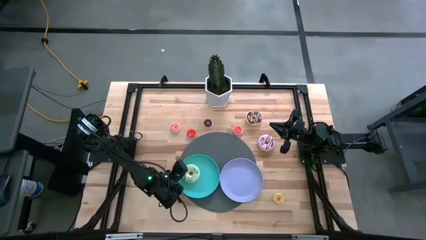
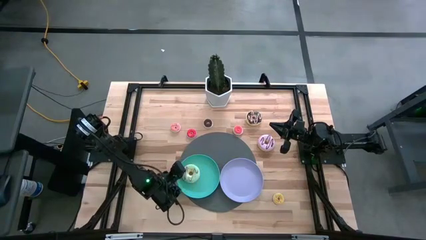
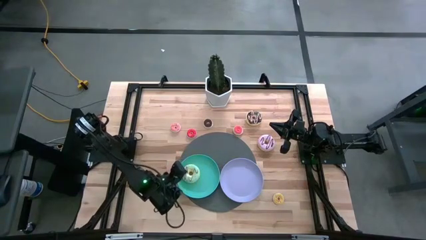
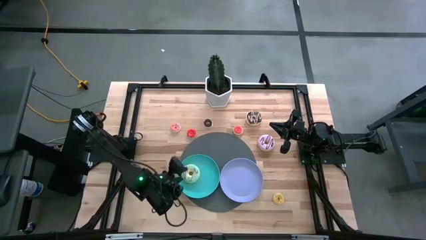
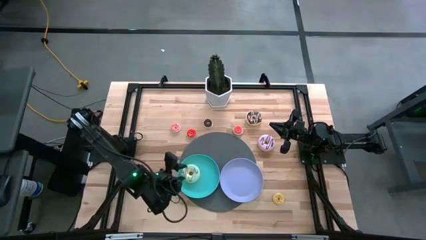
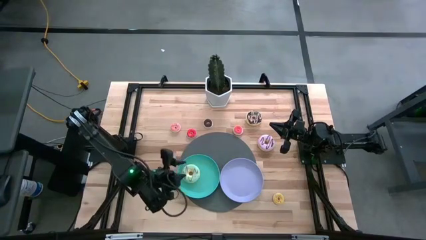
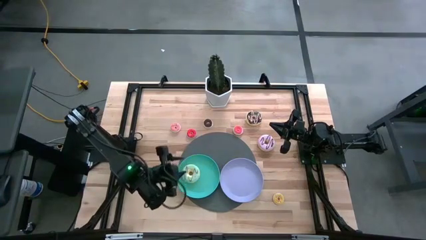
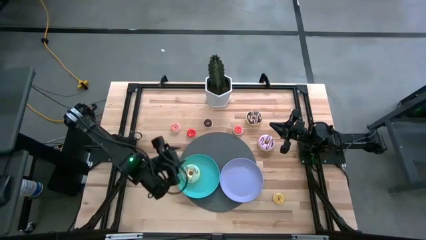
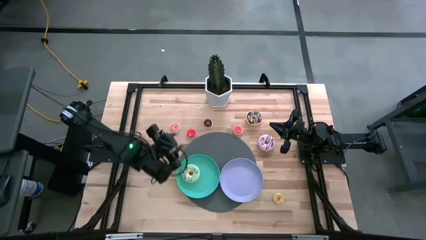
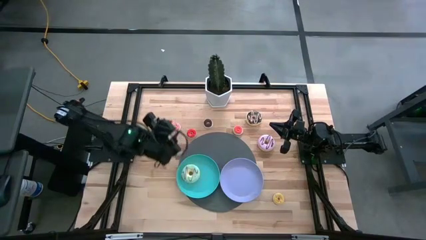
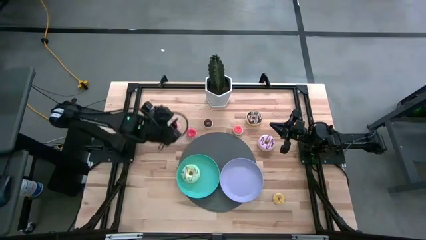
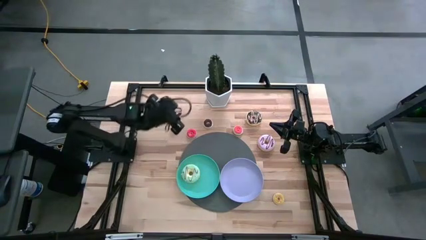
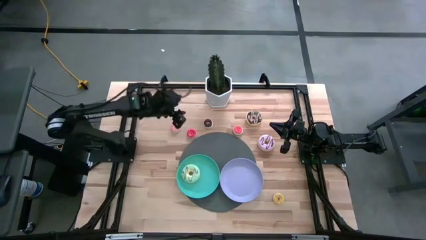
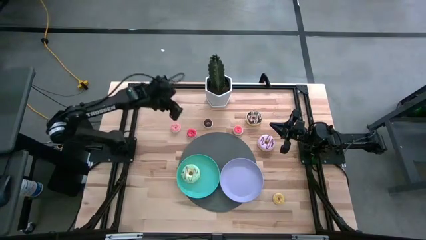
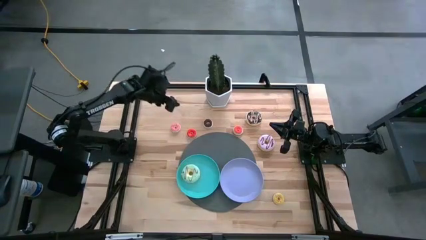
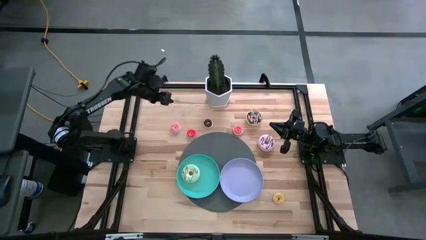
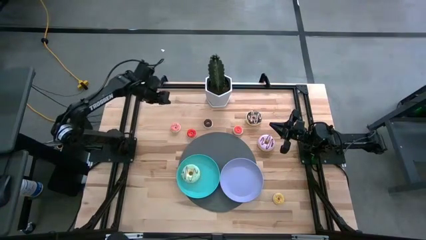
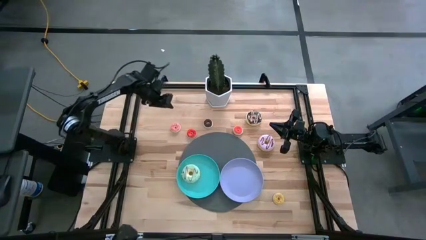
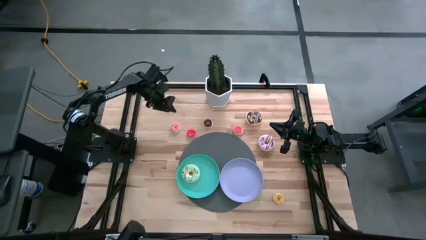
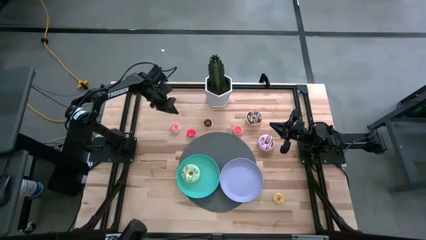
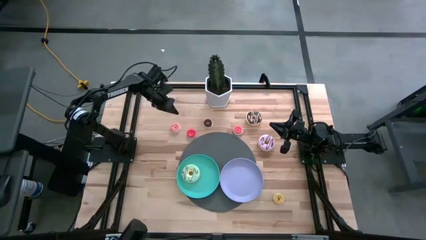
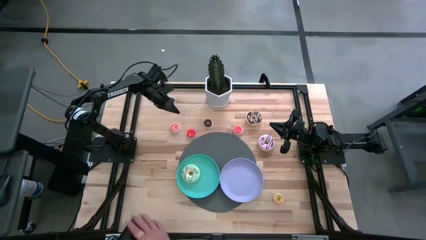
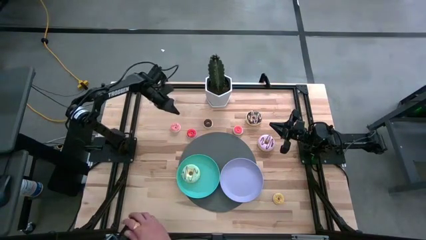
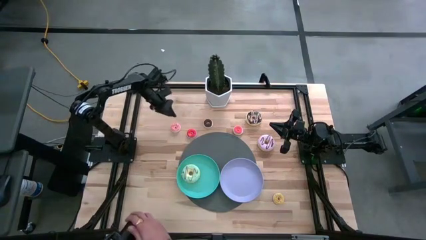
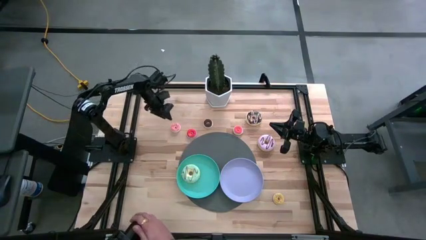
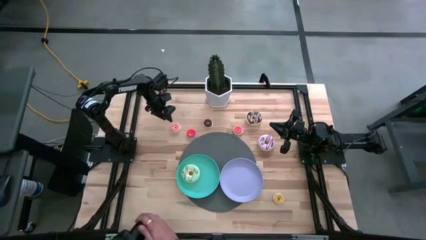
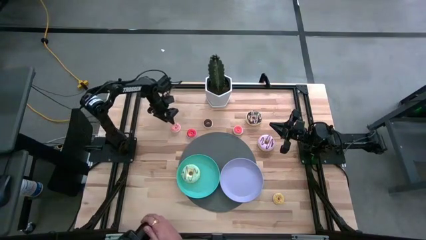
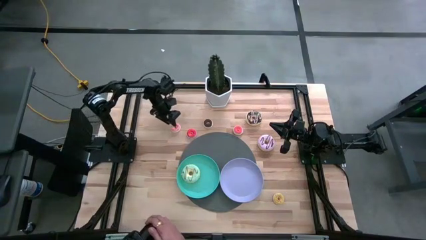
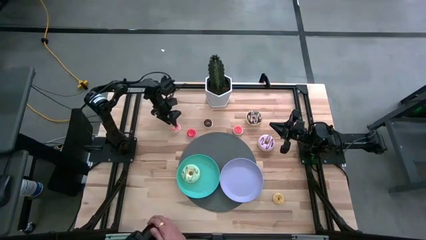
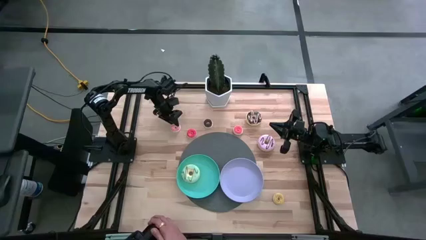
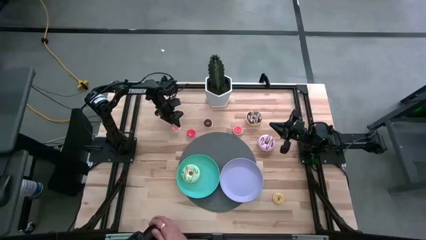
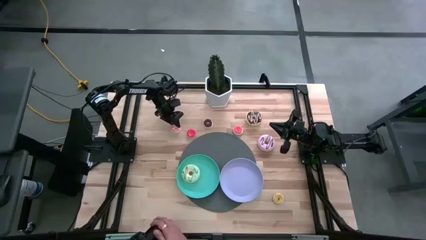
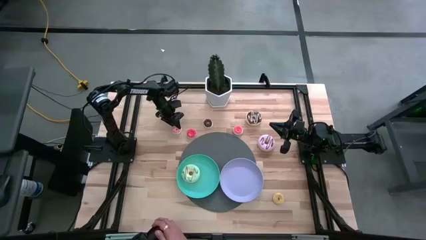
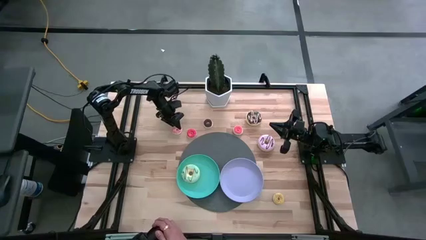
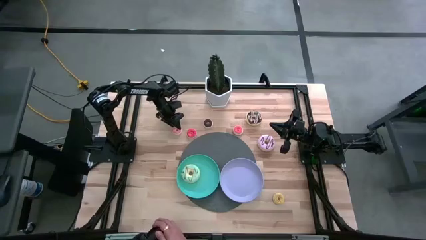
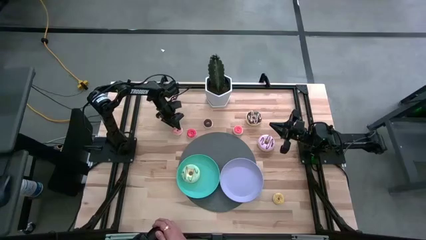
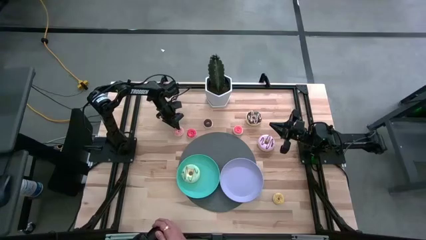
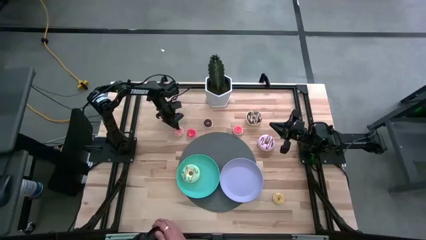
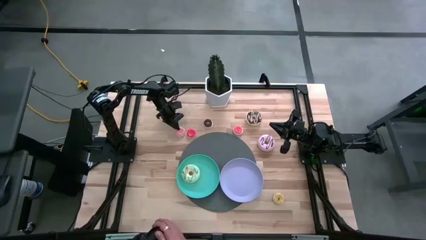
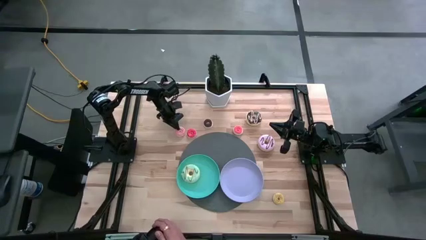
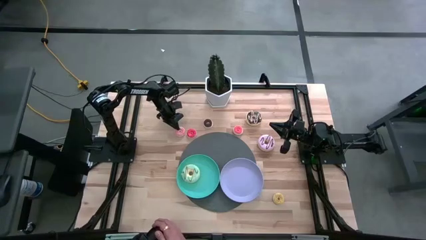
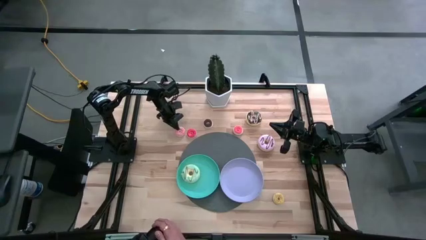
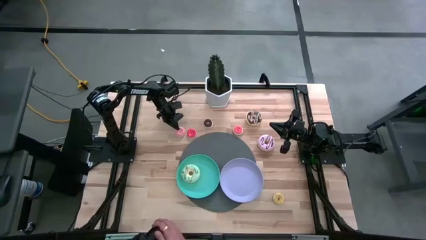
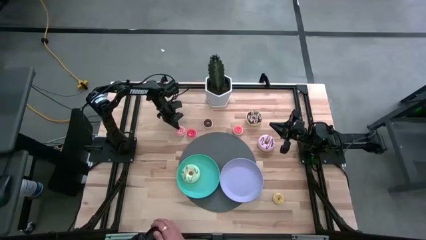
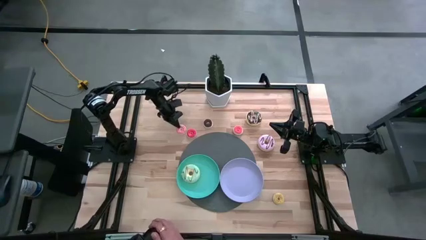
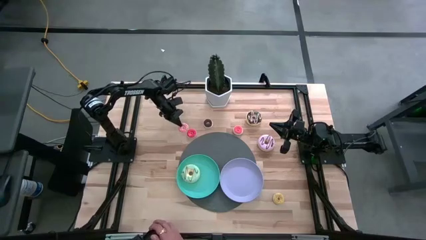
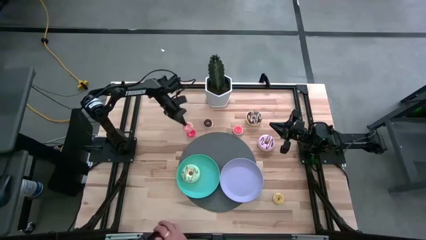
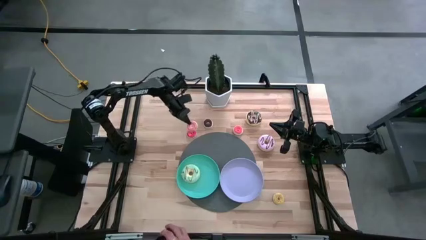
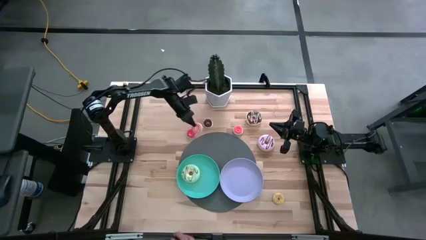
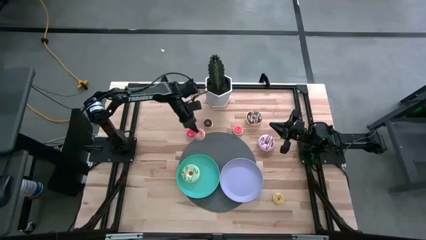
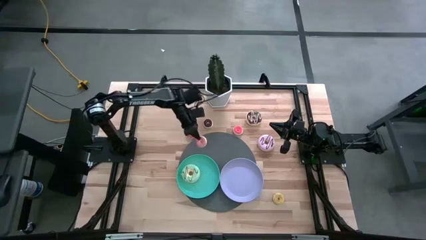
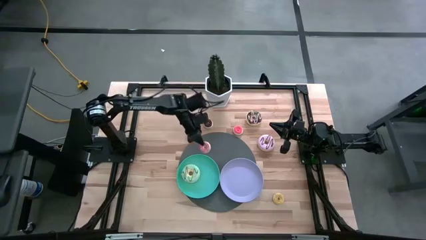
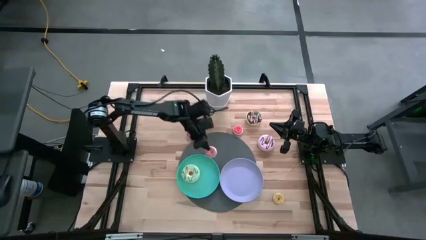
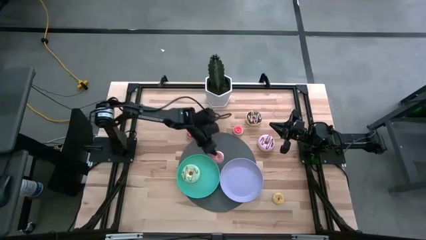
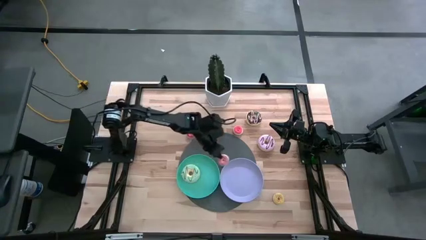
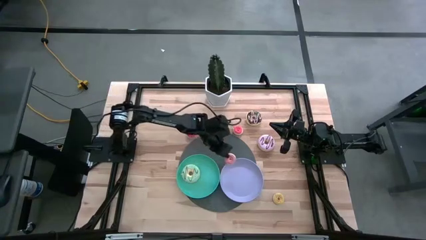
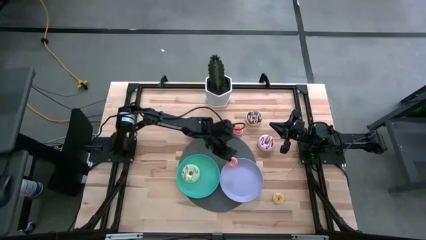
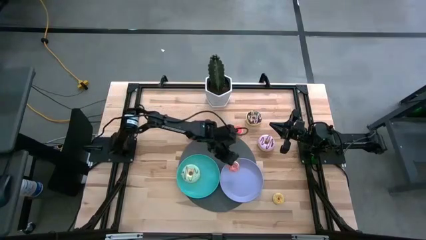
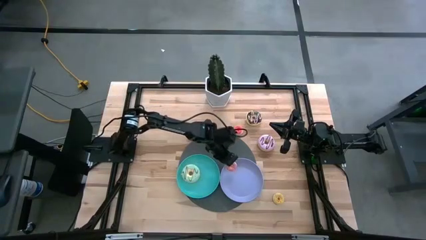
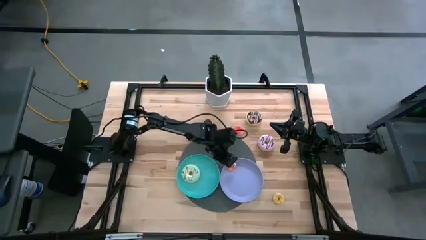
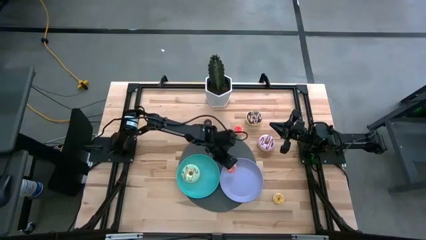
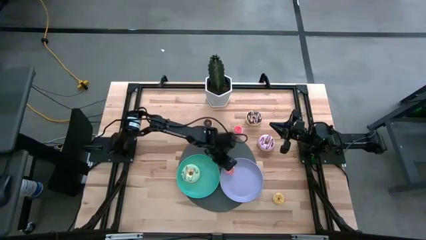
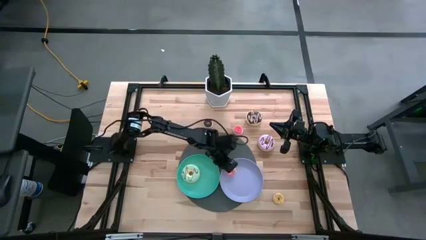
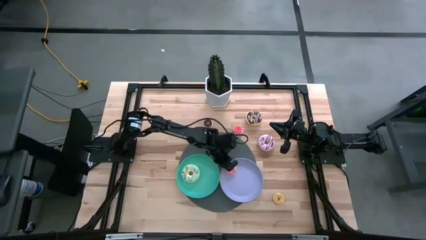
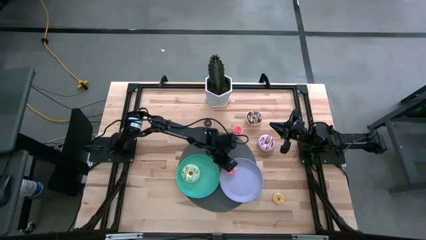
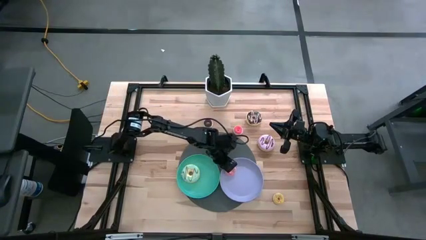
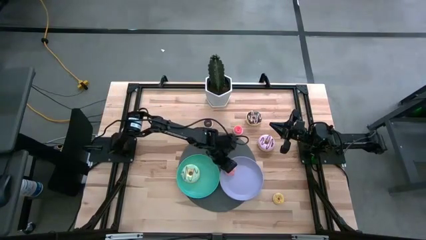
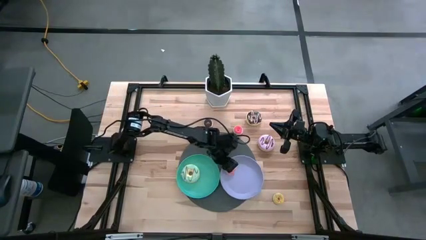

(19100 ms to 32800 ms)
Task: Pick & Place donuts
Put the small pink donut on the purple plate

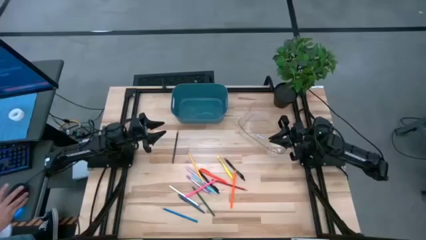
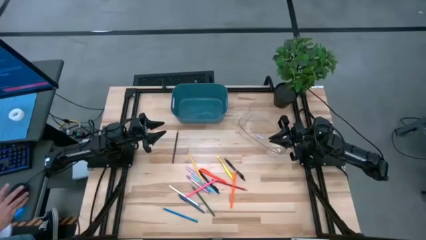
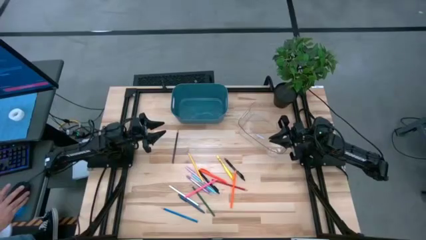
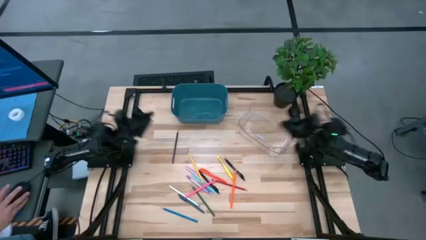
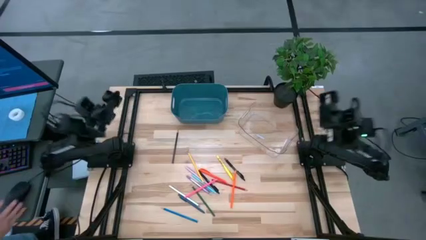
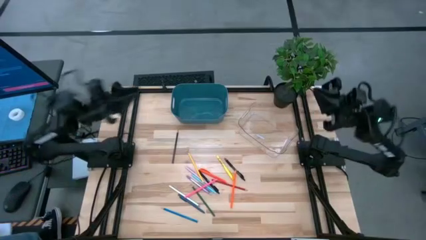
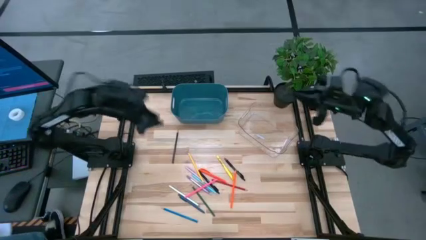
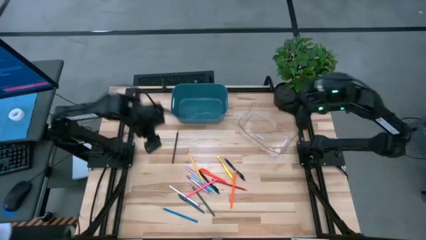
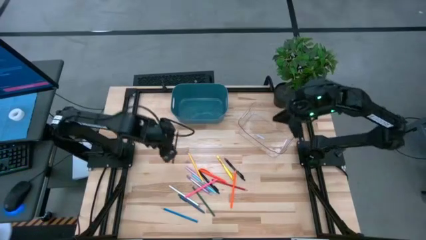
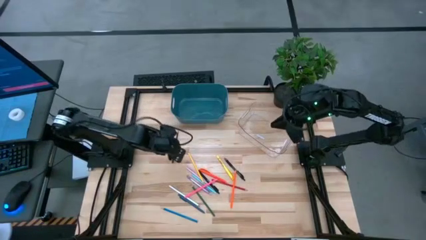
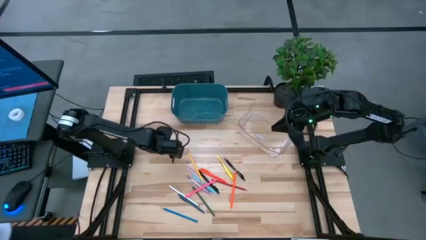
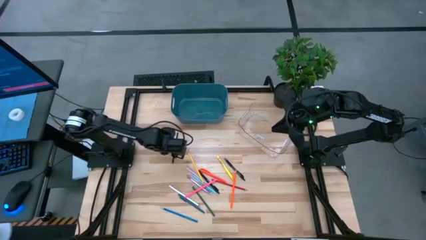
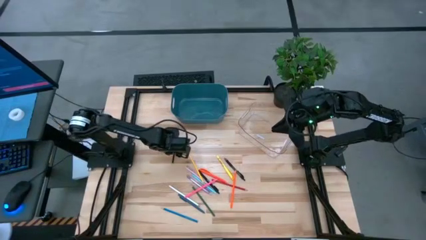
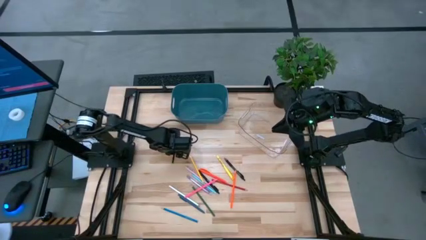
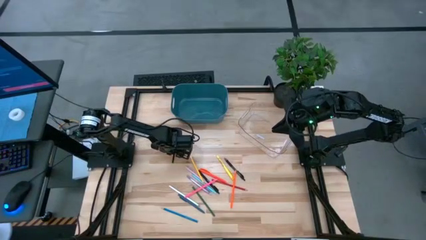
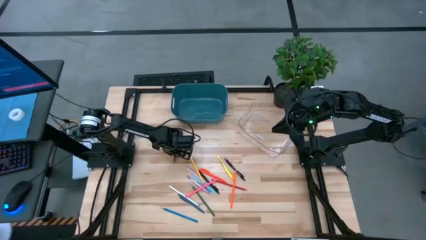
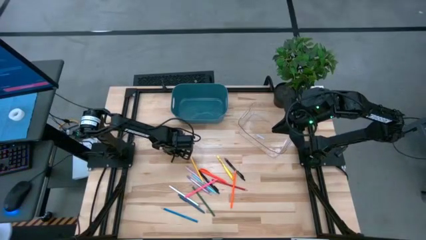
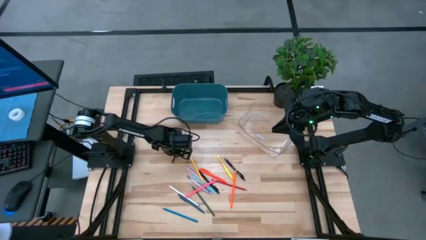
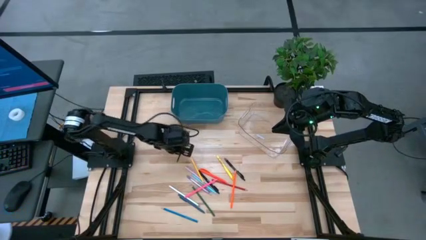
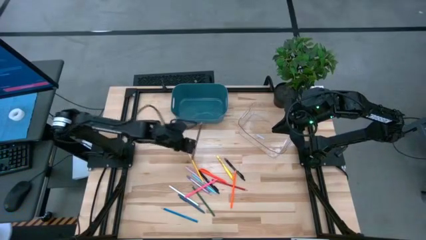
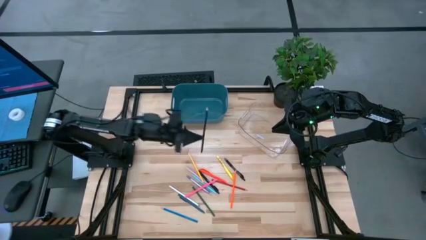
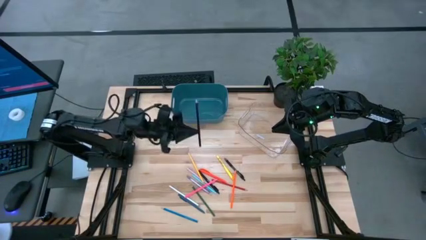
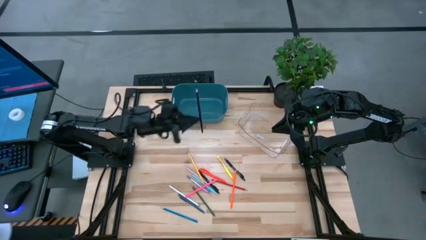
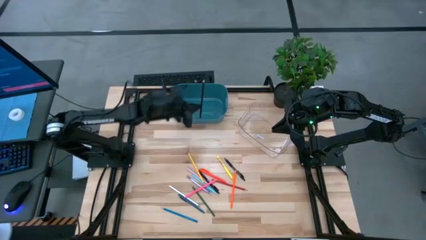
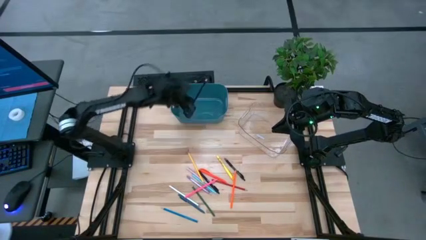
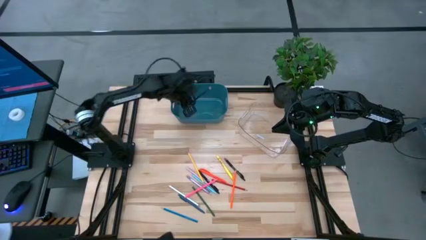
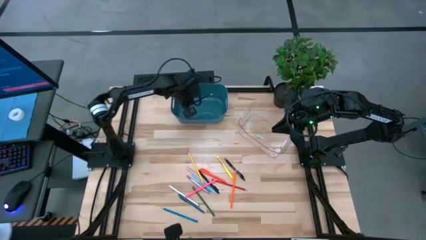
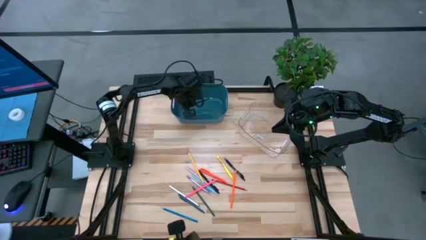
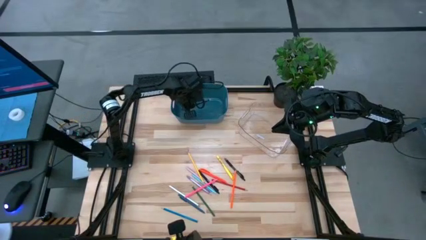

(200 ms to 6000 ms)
Task: Sort pens & pencils
Put the black pencil into the blue bin
